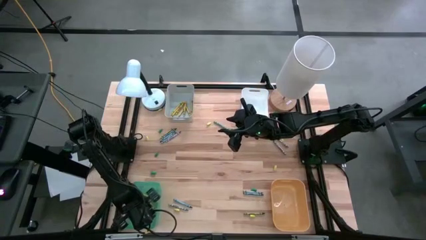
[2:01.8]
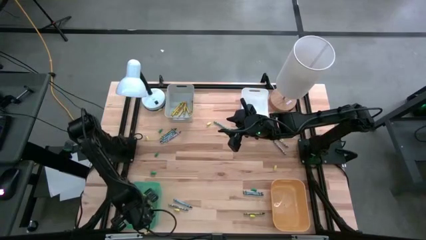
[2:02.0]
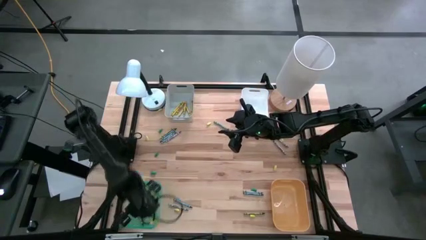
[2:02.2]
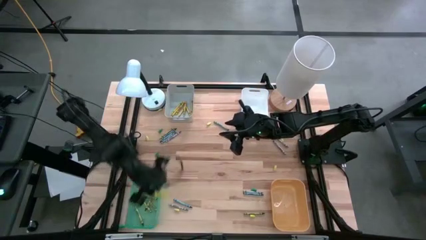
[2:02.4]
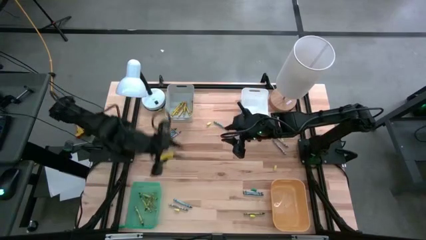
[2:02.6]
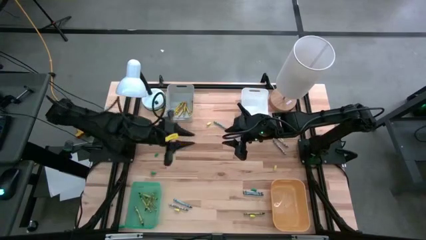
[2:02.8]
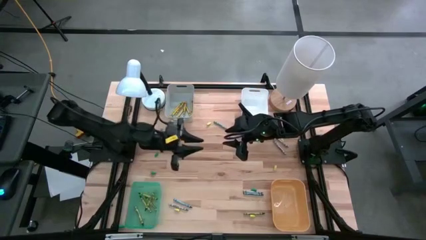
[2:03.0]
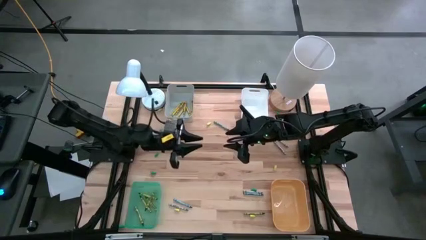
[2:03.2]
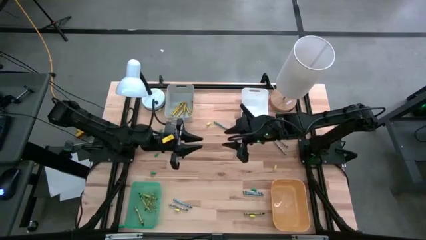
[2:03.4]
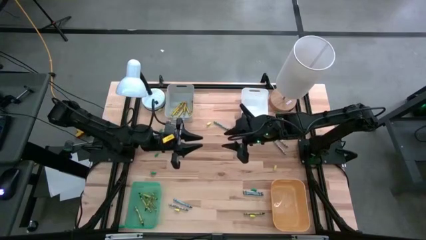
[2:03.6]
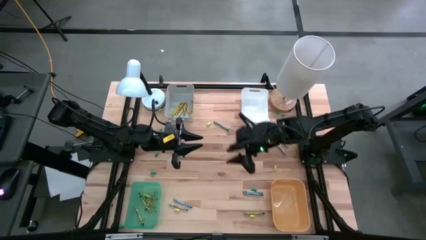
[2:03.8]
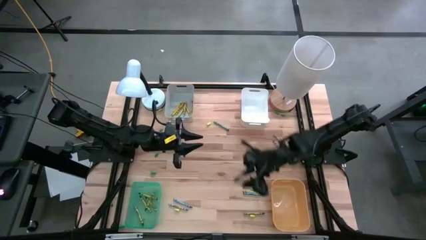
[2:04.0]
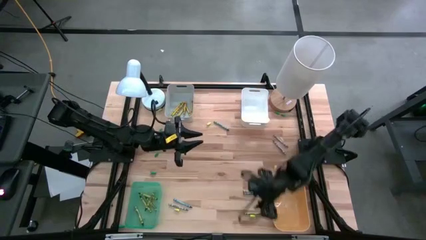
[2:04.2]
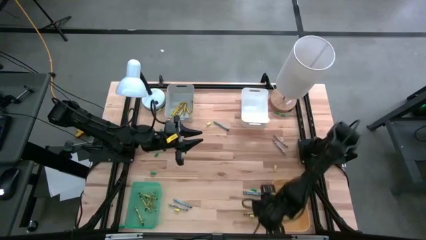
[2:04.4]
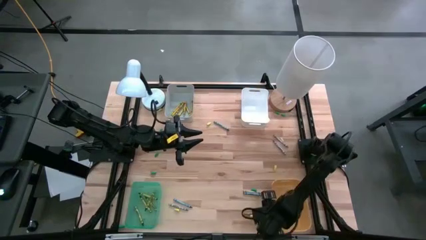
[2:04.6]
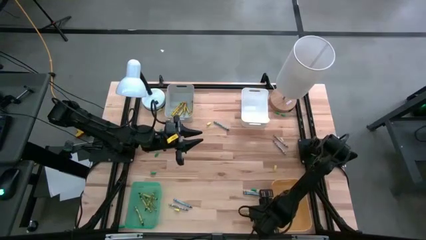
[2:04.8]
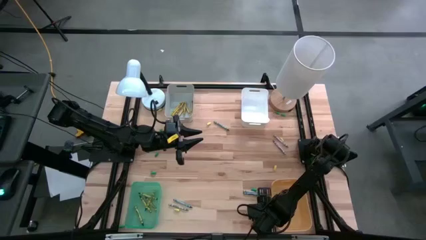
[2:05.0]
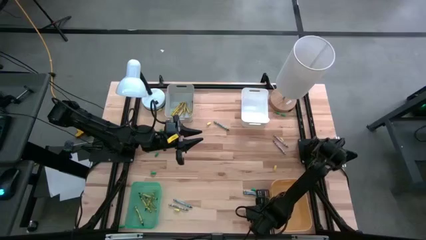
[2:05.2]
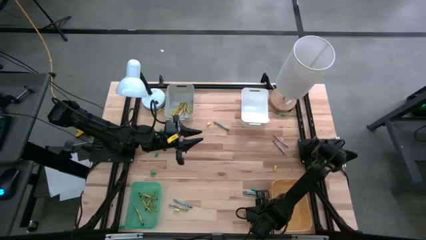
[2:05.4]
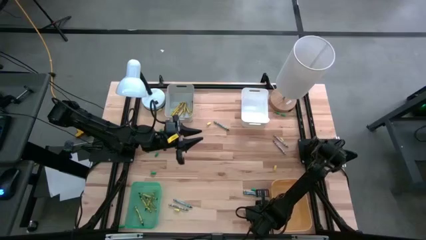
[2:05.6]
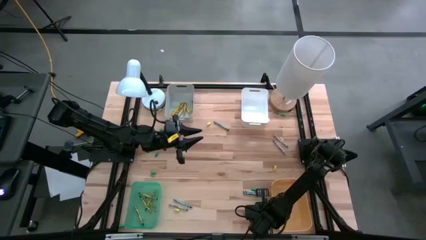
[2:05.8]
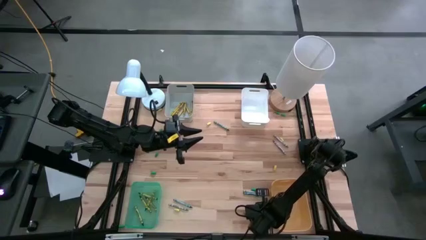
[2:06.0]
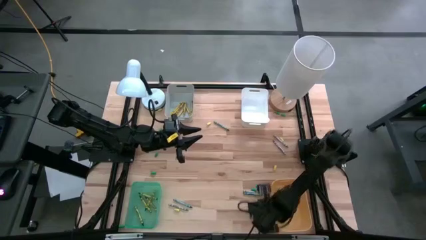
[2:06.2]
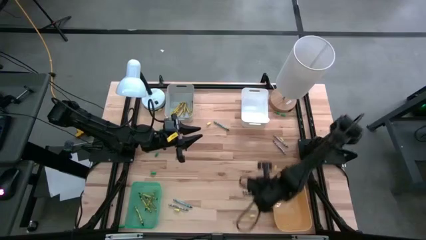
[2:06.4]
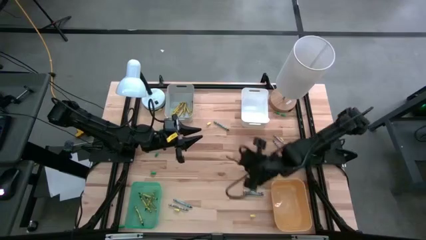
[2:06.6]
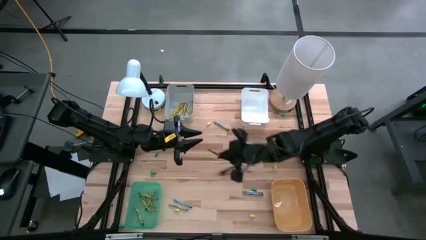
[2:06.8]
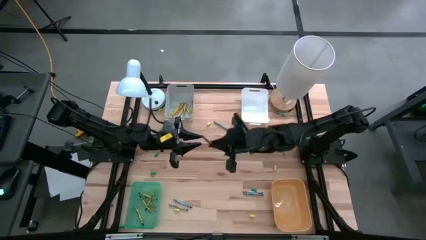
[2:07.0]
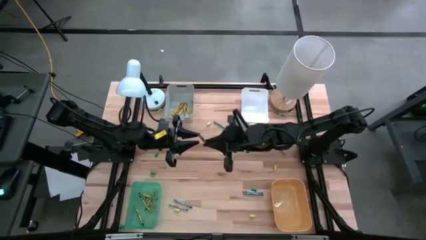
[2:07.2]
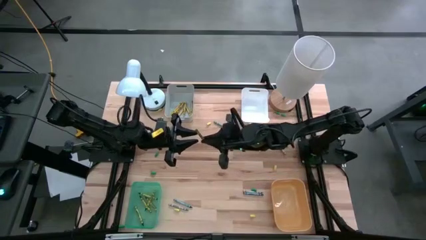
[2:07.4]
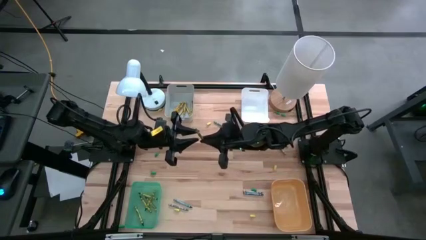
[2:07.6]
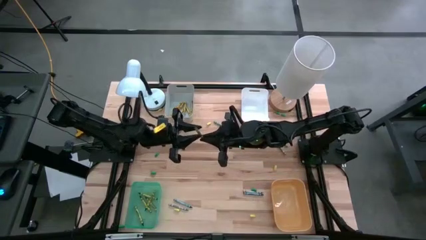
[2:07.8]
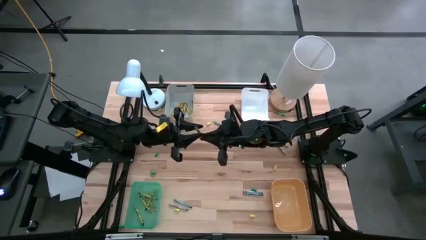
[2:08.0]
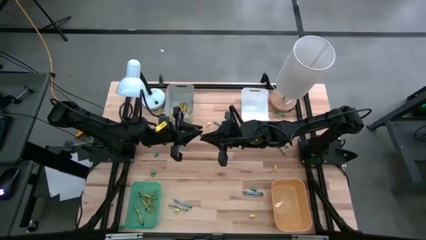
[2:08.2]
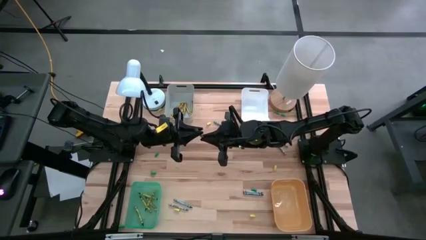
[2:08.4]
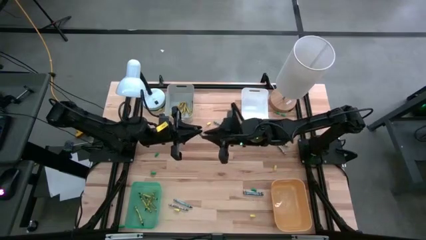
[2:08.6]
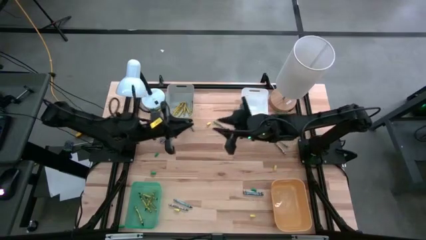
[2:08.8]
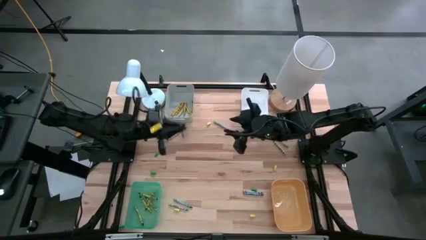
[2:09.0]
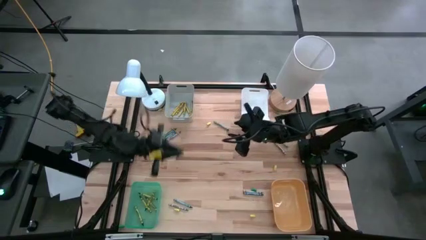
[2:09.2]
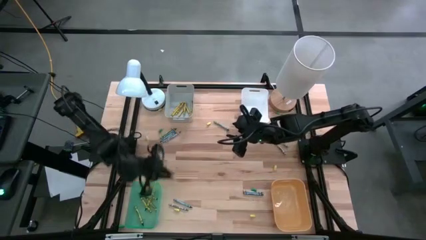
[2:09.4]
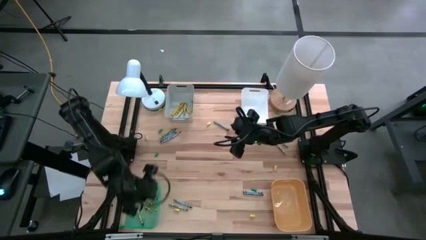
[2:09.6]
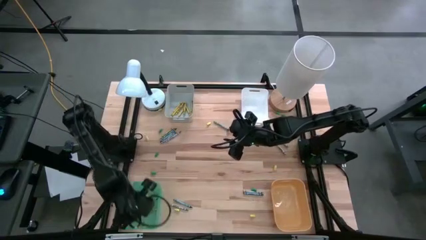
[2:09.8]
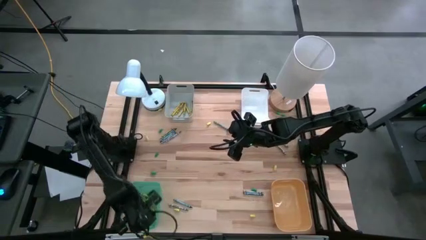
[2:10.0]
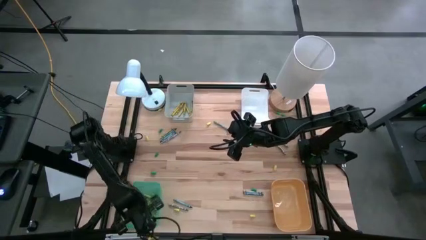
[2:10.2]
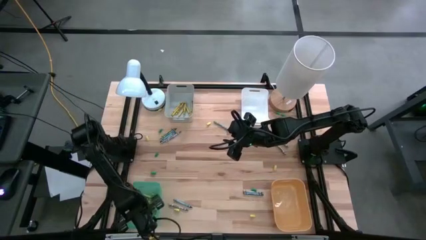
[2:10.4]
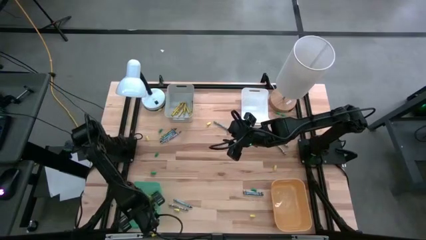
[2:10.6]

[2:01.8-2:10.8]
Task: Sort crayons
Put the green crayon into the green bin
